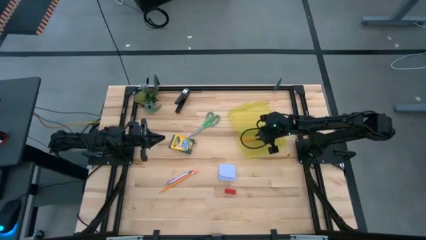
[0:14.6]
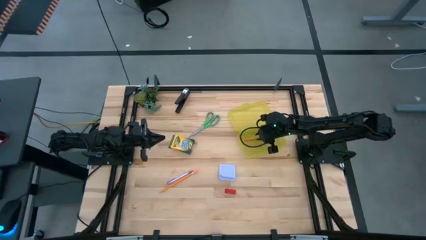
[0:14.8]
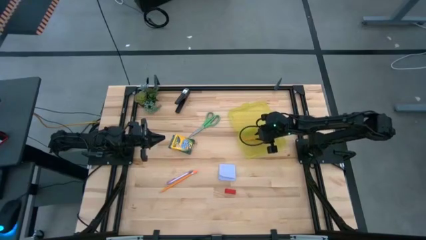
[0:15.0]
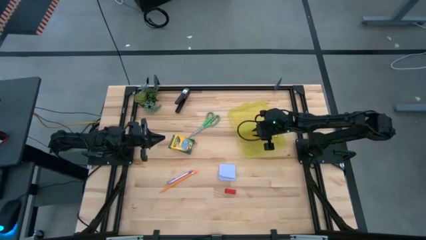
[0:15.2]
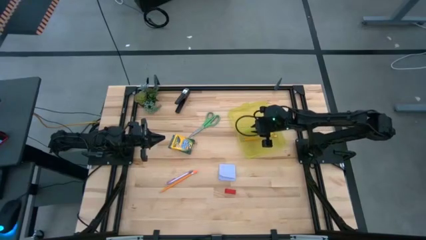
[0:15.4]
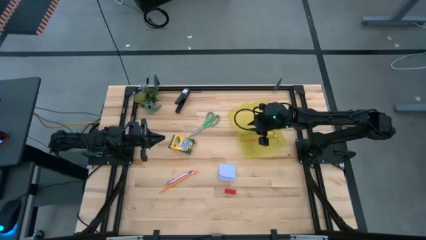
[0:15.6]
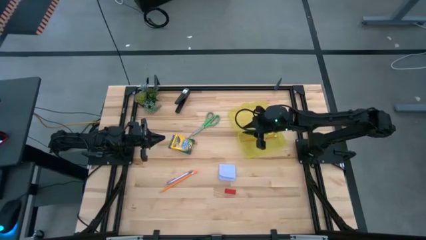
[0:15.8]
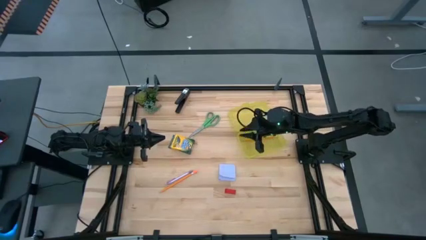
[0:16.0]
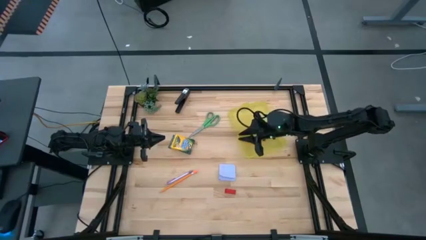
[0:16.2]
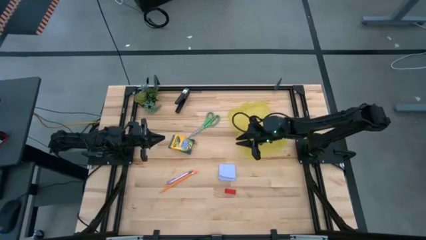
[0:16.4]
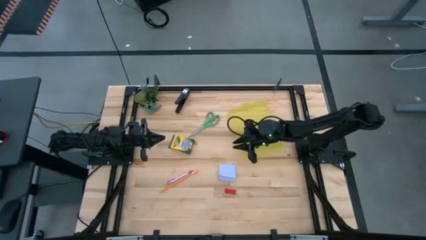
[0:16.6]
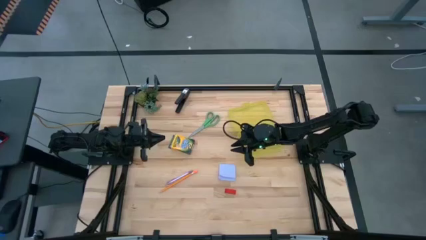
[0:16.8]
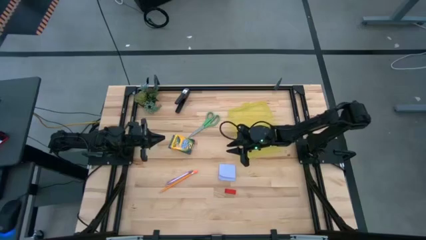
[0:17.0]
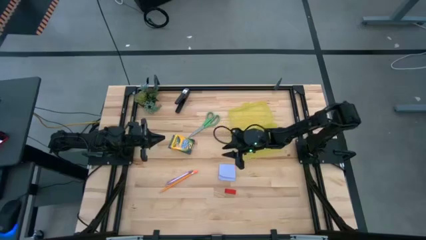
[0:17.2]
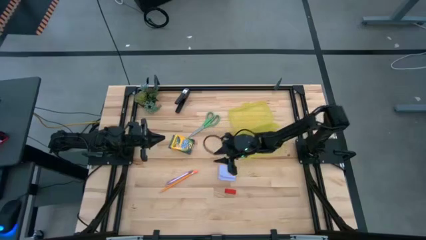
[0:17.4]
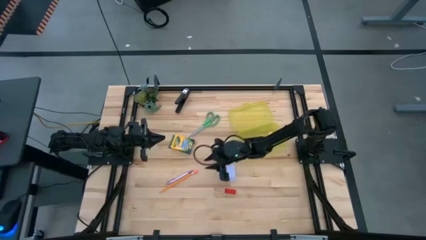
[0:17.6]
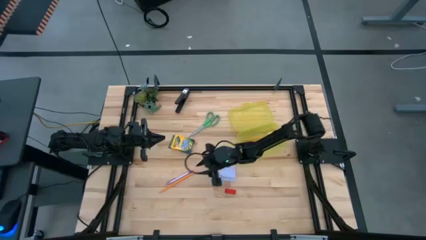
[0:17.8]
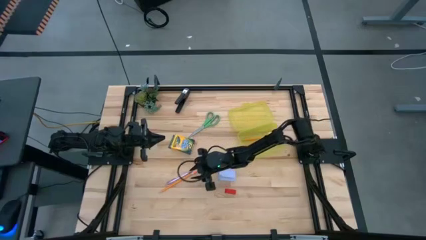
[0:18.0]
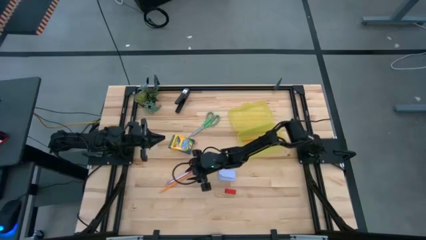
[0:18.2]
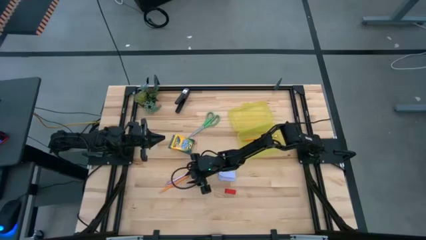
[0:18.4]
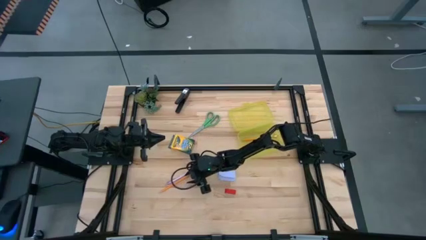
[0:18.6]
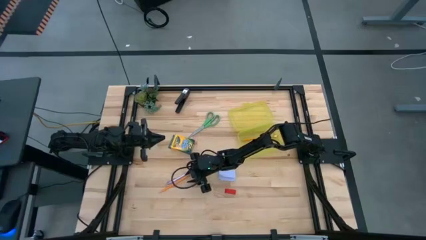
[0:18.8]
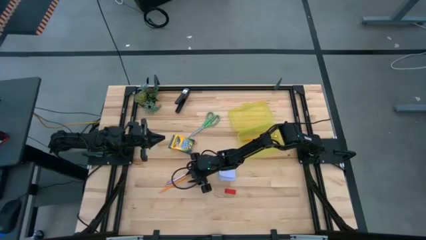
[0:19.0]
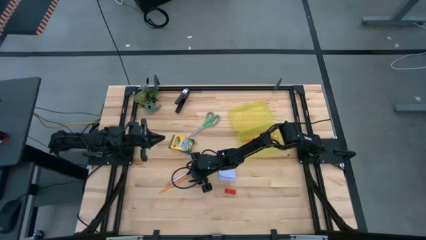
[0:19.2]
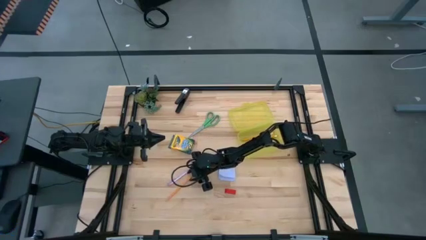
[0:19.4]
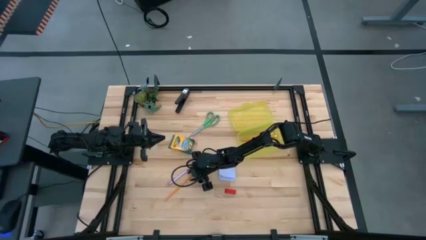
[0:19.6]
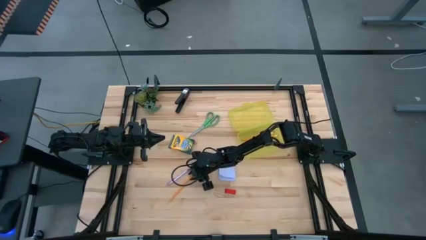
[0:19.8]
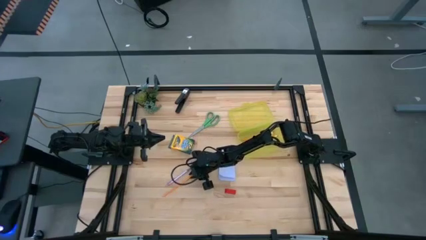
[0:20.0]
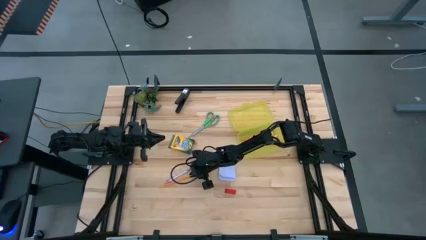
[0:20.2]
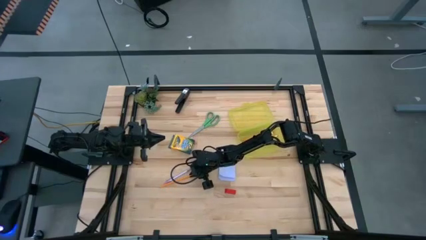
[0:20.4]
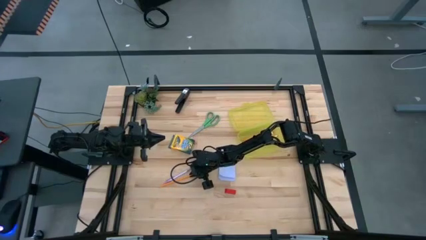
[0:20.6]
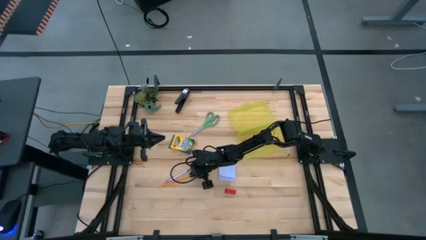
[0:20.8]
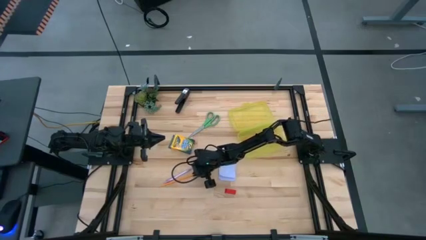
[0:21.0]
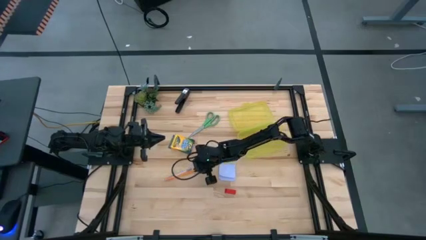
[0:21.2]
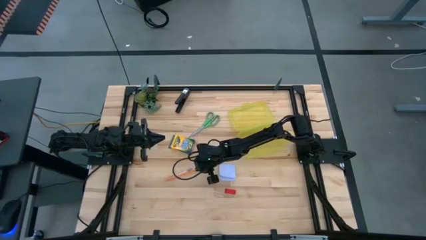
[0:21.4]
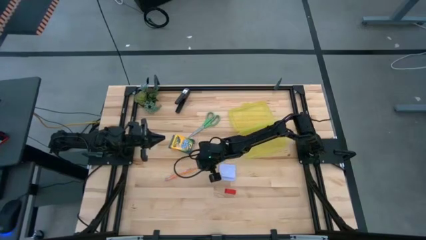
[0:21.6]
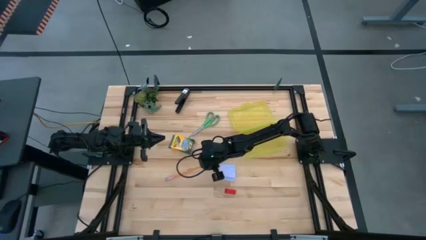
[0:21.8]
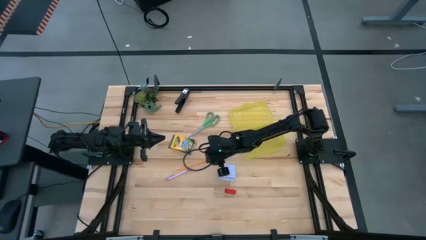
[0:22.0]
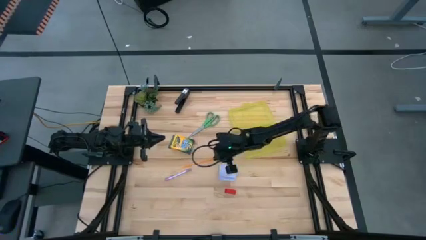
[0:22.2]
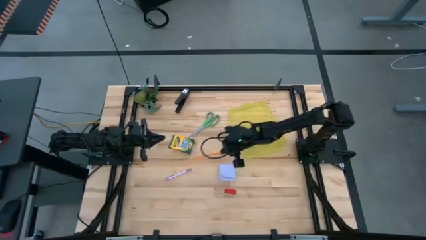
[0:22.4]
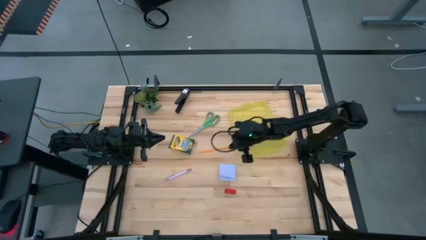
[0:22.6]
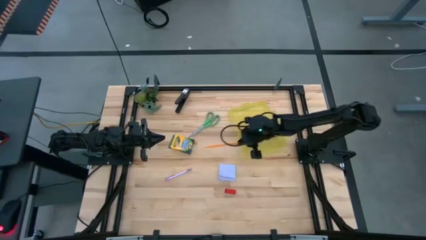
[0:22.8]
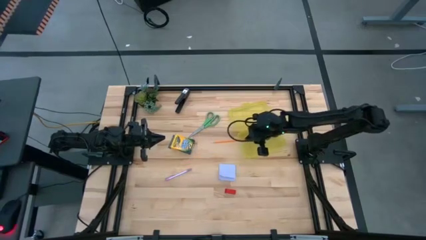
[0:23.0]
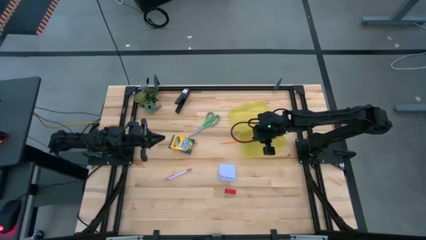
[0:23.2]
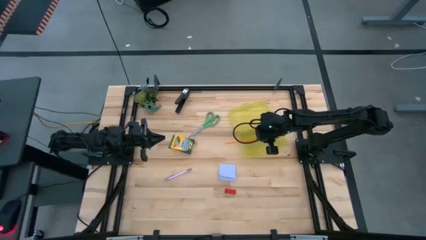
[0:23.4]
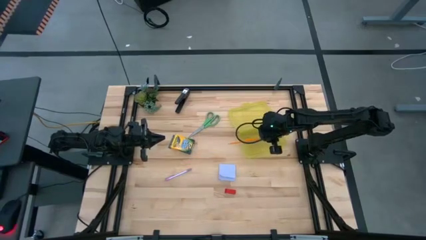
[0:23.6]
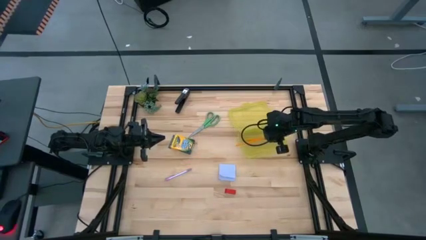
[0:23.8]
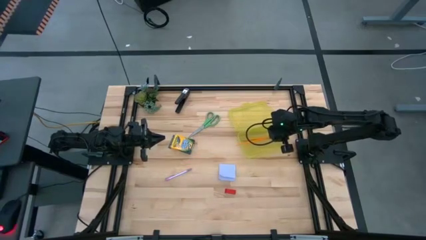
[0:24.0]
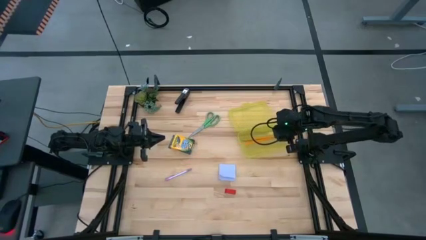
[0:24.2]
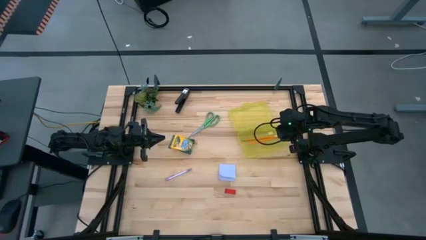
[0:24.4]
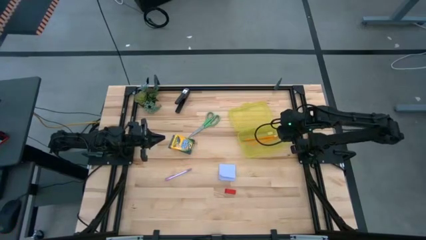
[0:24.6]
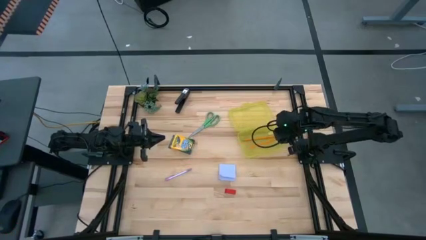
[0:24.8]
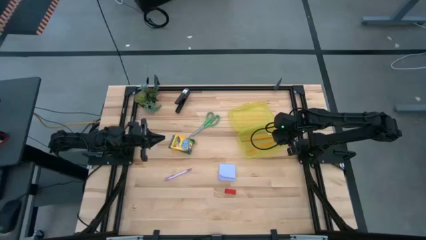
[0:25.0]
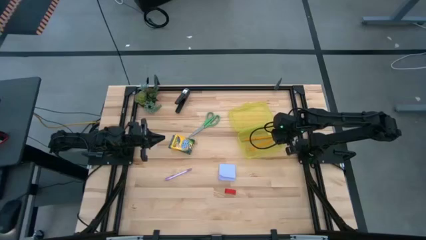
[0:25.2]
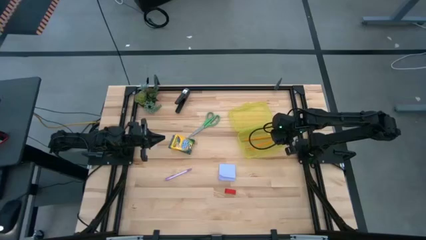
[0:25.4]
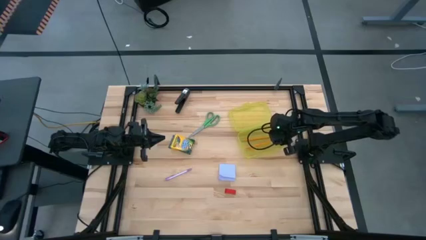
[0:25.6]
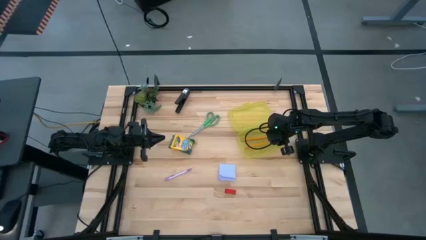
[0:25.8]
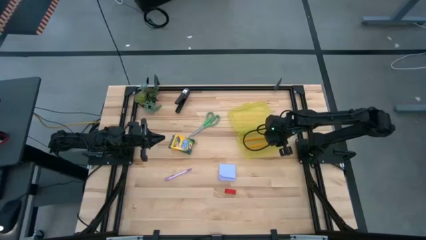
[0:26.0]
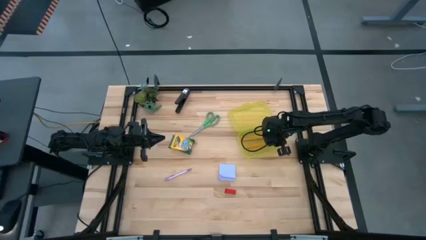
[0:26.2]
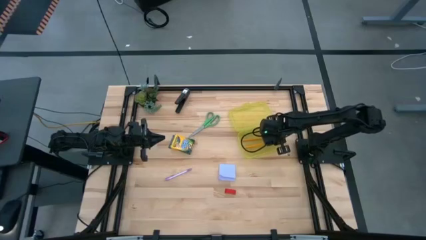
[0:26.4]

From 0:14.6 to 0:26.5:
Task: Pack school essentials
Put the yellow pencil into the yellow supply box

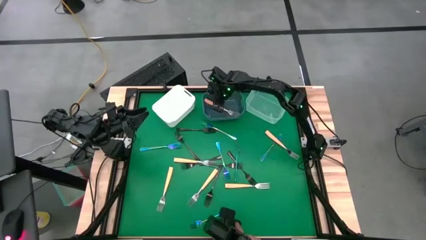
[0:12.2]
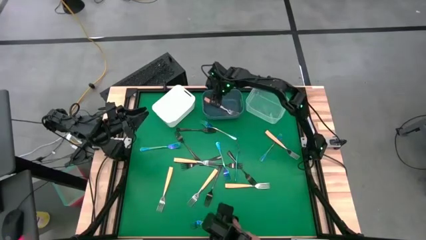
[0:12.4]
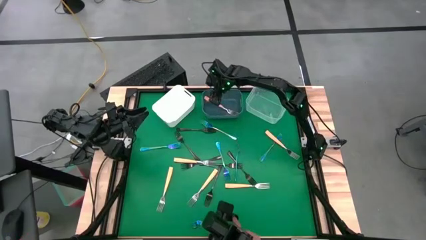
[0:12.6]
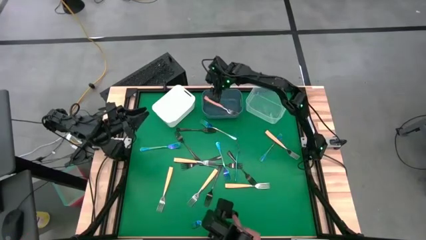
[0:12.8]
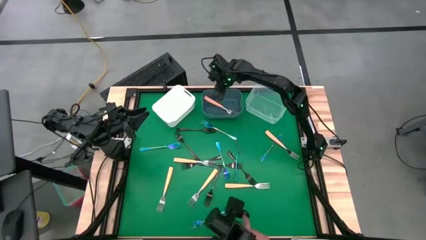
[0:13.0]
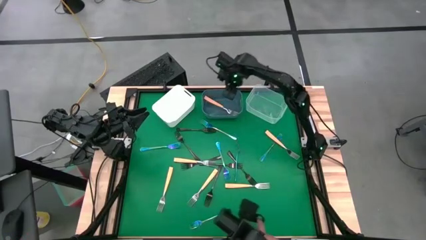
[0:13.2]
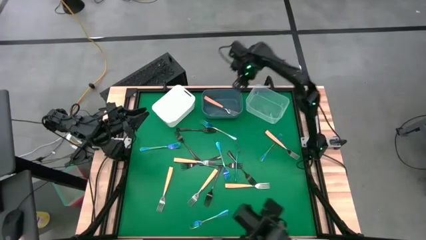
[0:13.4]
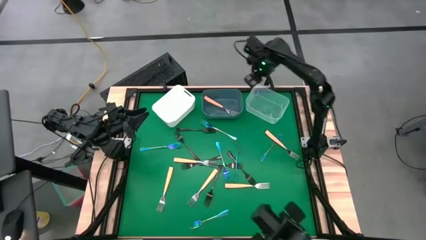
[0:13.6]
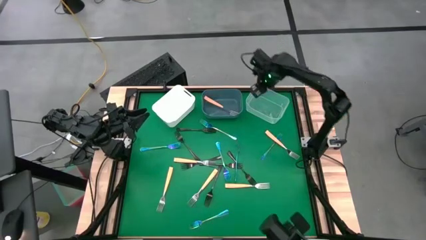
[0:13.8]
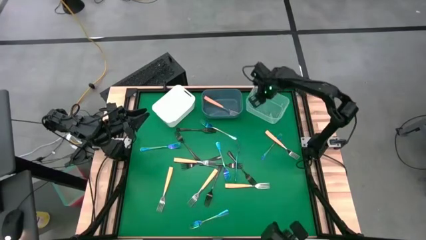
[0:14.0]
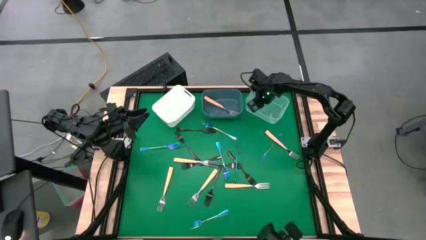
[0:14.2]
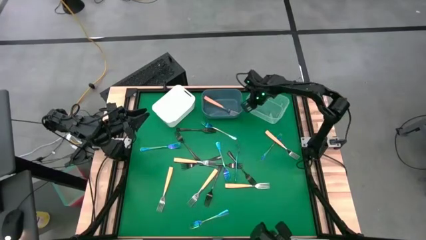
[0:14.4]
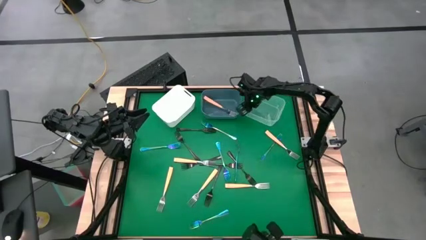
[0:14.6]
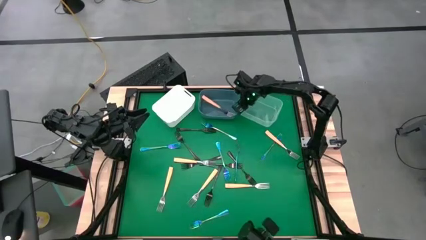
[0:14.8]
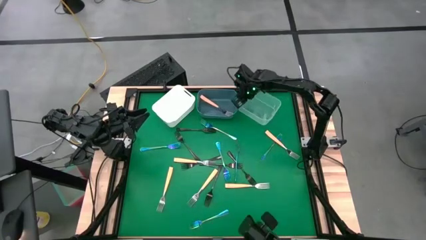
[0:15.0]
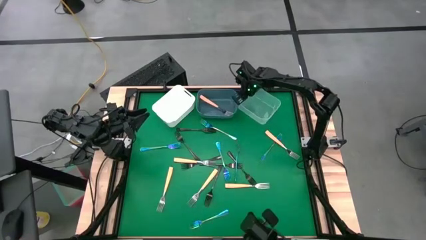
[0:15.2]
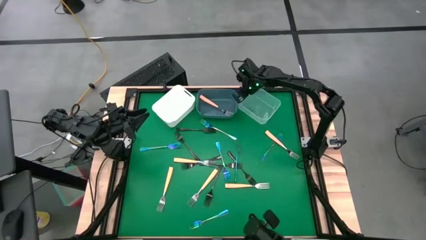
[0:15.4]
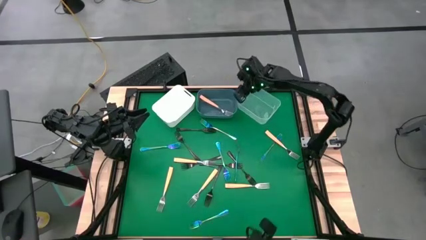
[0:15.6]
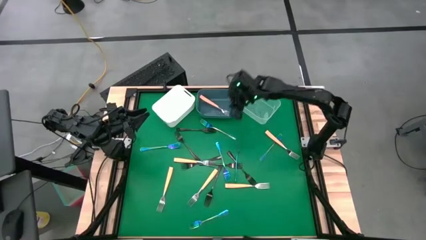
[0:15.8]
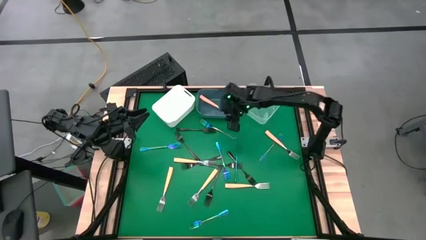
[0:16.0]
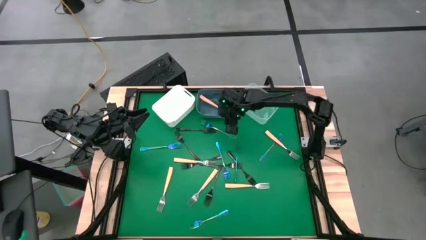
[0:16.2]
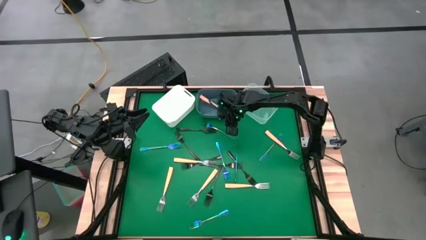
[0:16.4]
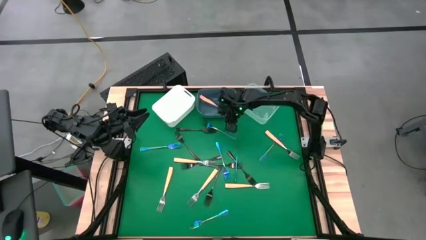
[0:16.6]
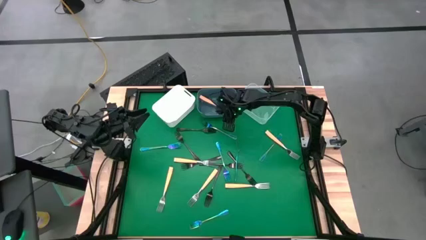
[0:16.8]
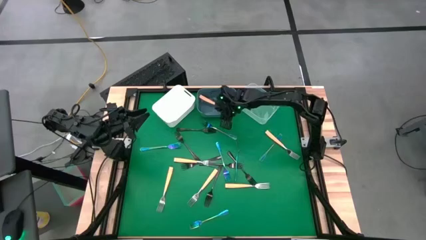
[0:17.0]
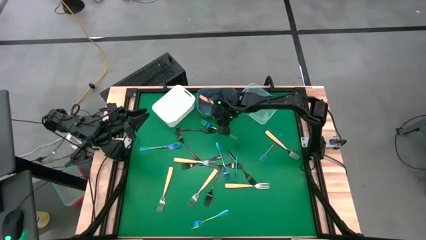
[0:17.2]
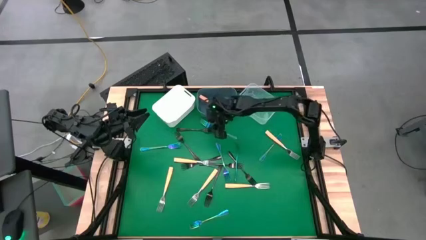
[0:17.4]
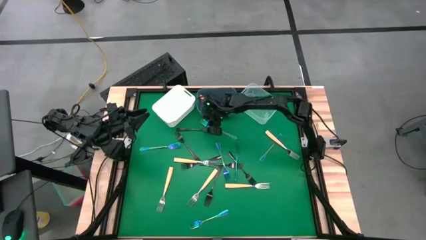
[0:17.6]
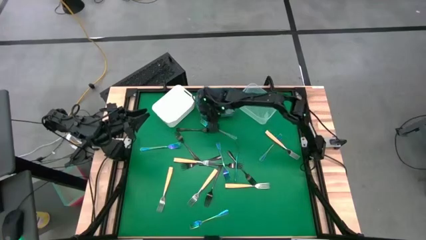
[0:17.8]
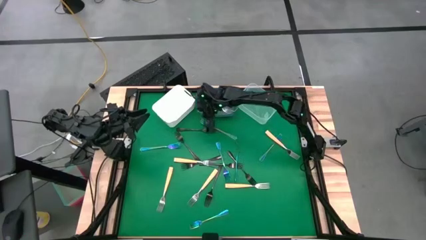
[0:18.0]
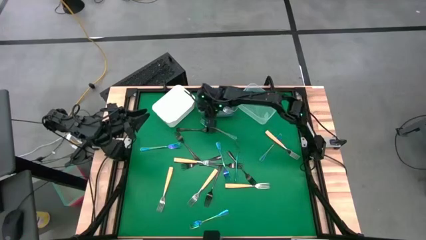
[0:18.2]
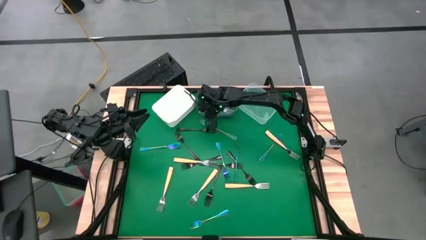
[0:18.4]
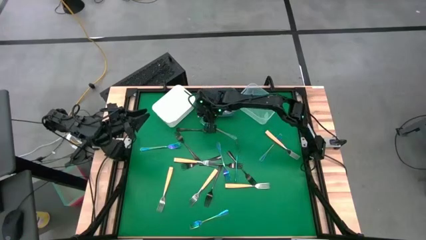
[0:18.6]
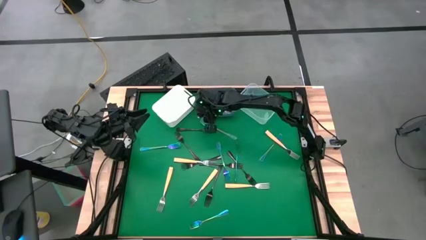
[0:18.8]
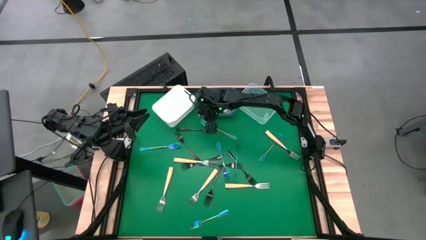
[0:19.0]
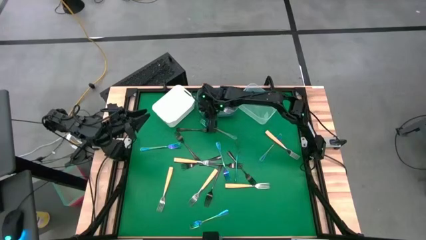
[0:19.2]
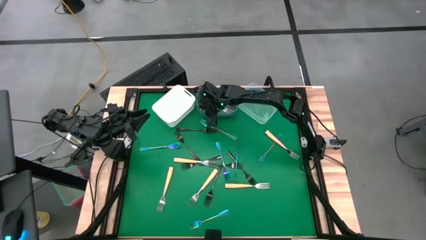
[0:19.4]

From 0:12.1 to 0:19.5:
Task: Sort silverware by color (type)
Adjust the transparent bin and blue bin
